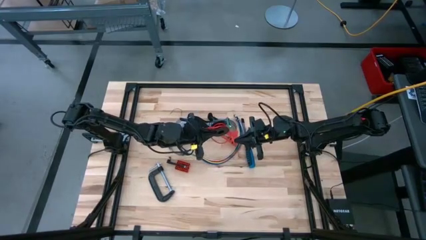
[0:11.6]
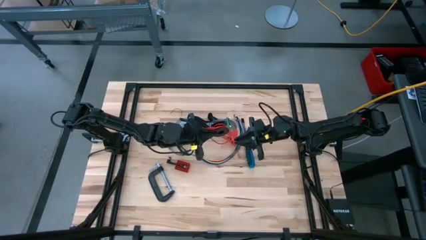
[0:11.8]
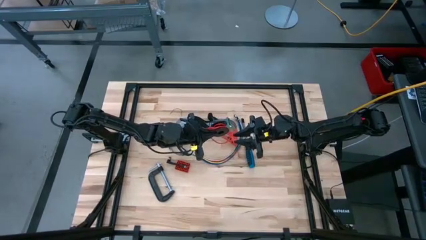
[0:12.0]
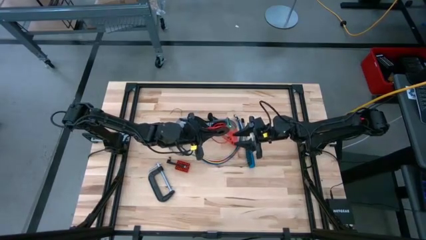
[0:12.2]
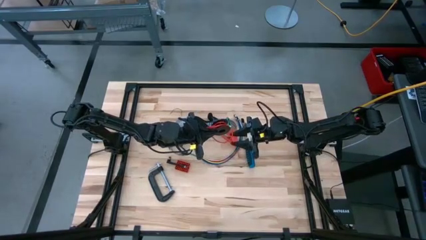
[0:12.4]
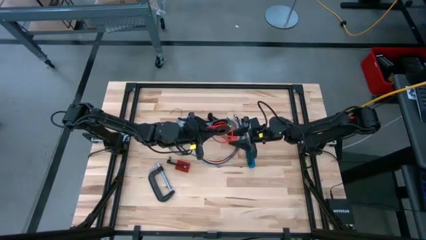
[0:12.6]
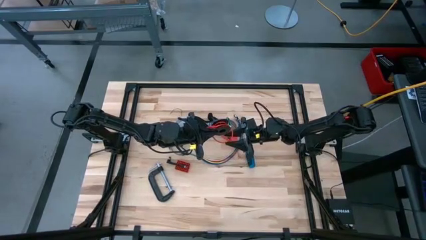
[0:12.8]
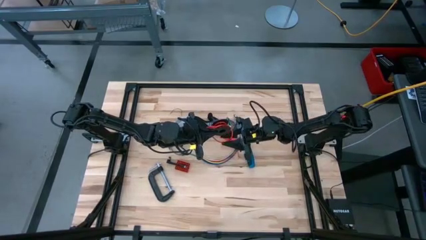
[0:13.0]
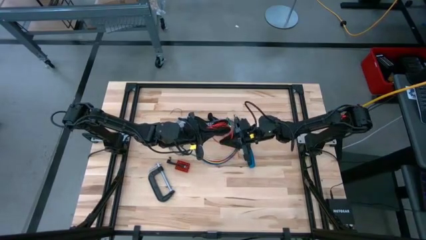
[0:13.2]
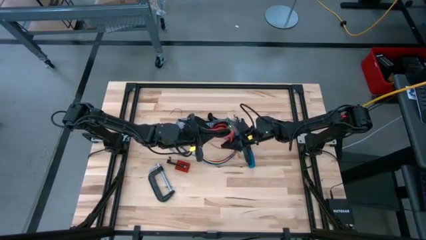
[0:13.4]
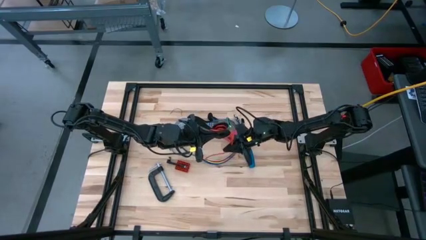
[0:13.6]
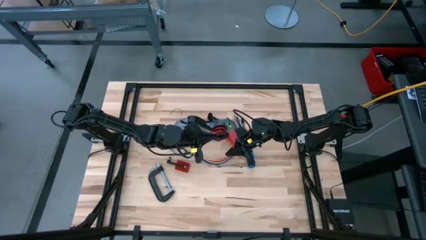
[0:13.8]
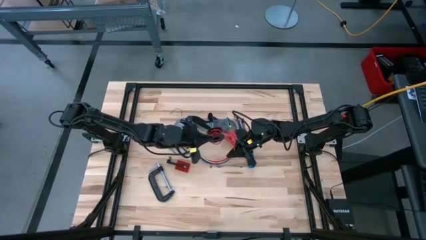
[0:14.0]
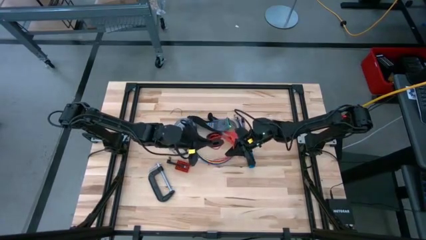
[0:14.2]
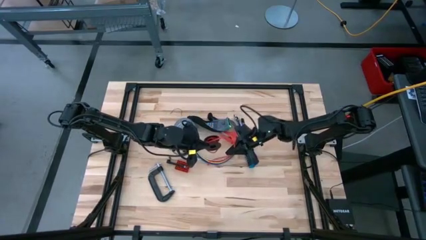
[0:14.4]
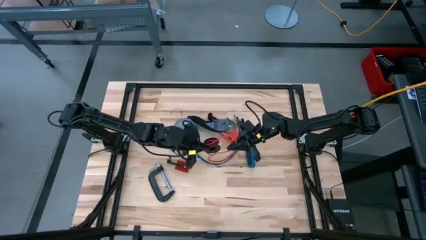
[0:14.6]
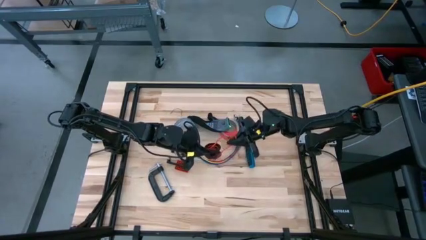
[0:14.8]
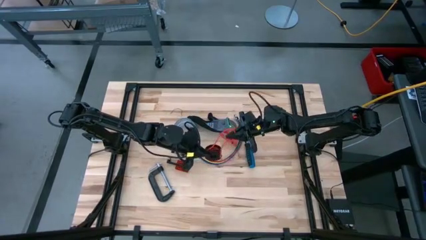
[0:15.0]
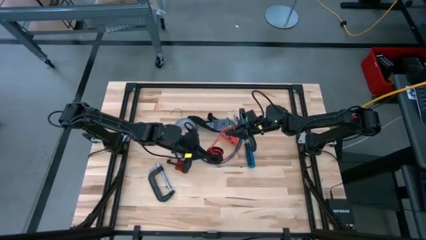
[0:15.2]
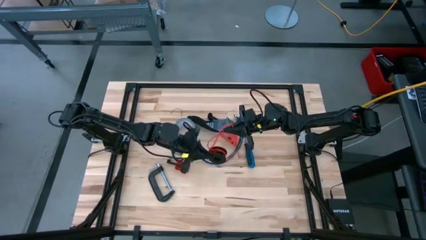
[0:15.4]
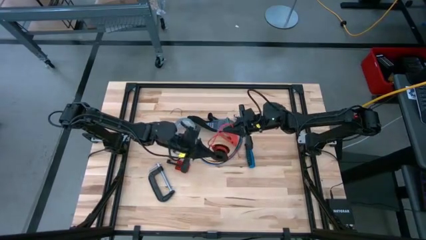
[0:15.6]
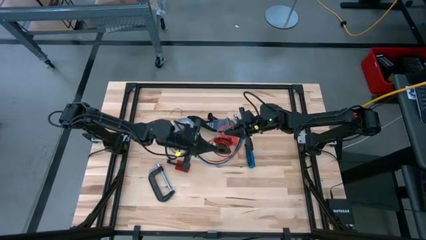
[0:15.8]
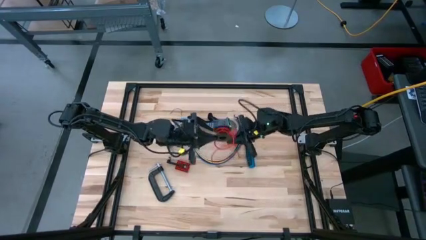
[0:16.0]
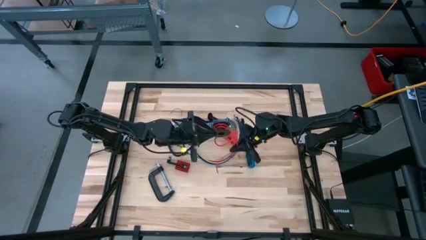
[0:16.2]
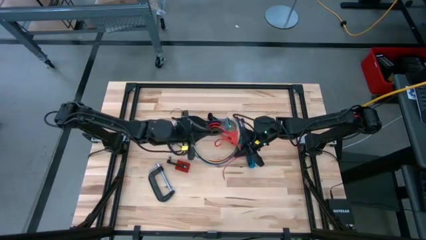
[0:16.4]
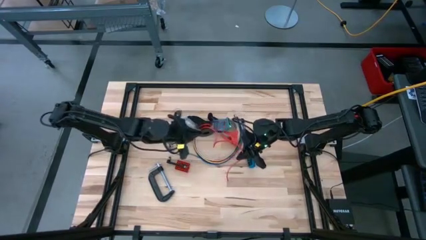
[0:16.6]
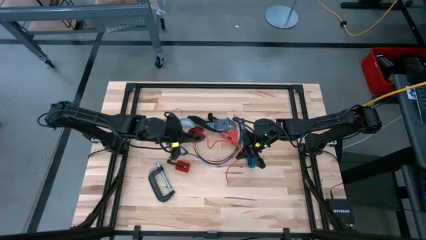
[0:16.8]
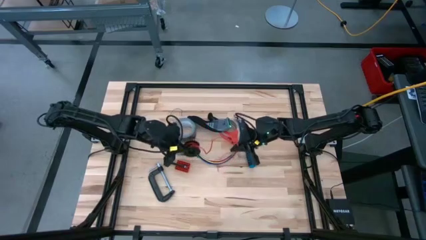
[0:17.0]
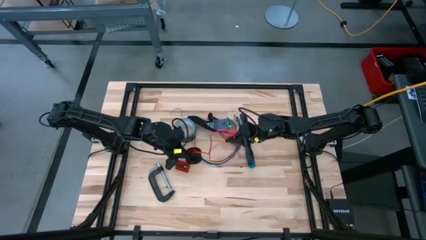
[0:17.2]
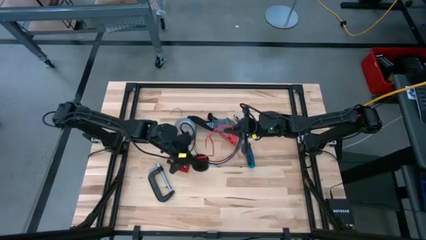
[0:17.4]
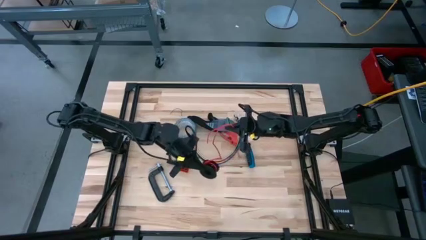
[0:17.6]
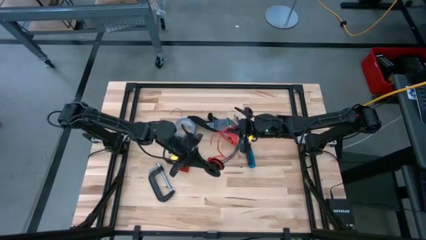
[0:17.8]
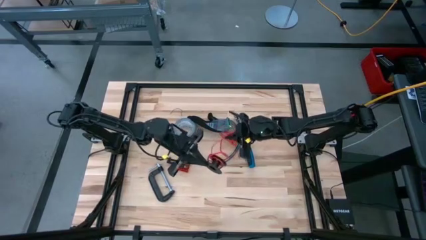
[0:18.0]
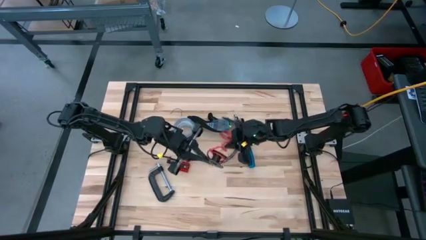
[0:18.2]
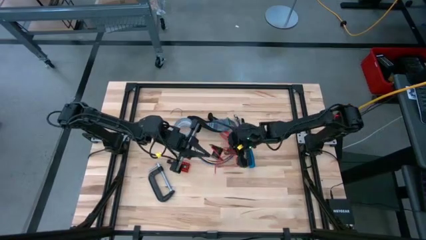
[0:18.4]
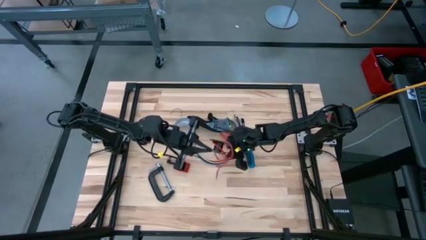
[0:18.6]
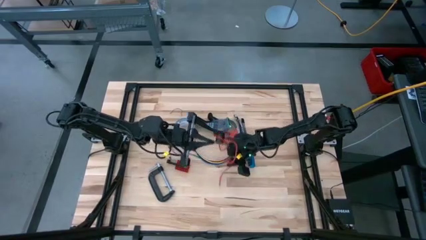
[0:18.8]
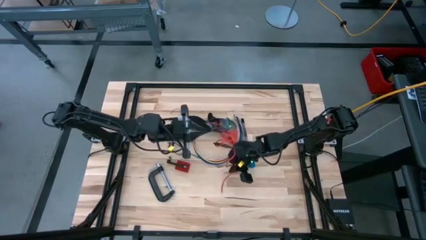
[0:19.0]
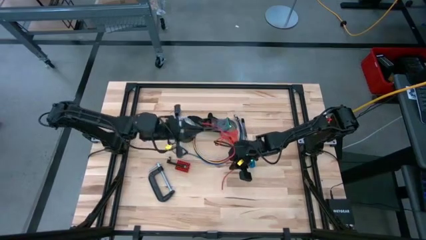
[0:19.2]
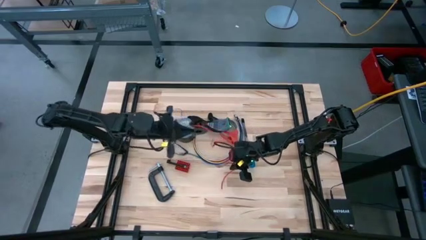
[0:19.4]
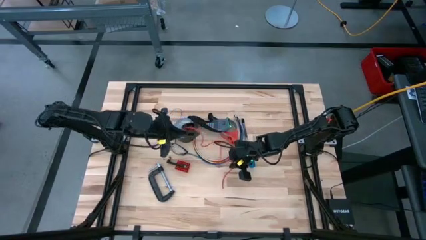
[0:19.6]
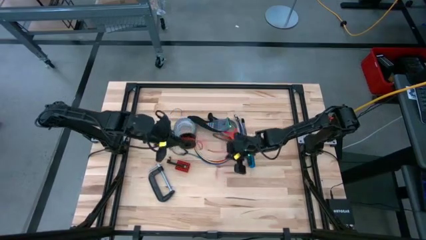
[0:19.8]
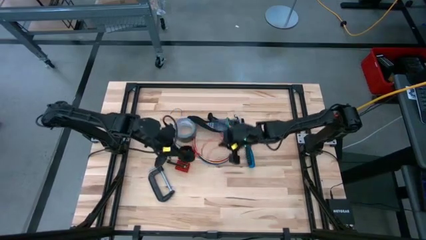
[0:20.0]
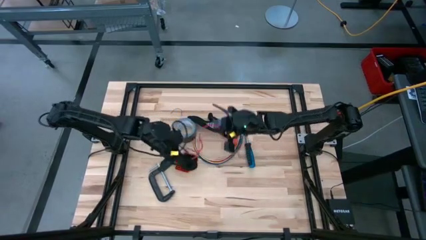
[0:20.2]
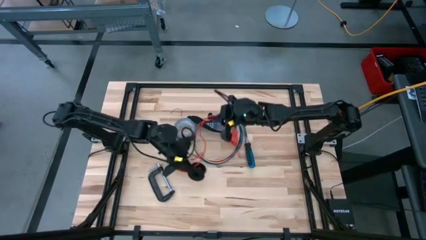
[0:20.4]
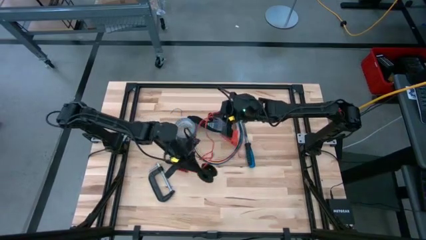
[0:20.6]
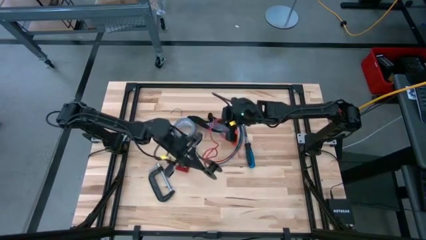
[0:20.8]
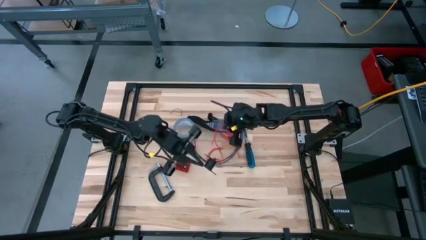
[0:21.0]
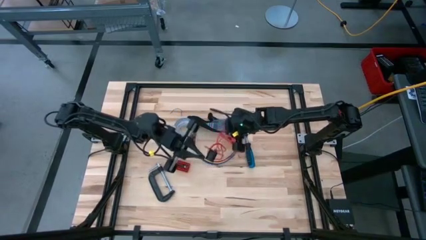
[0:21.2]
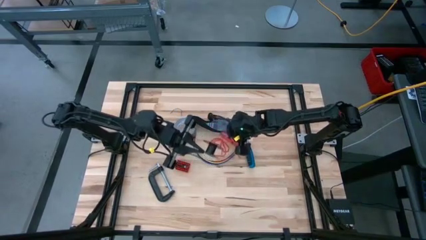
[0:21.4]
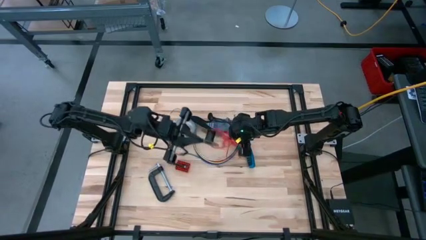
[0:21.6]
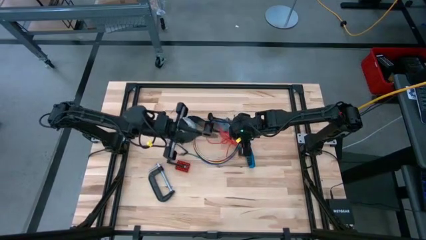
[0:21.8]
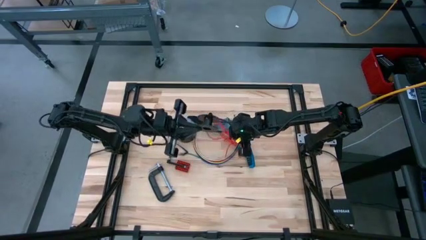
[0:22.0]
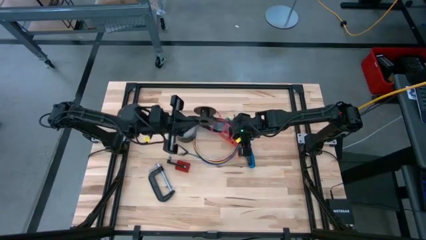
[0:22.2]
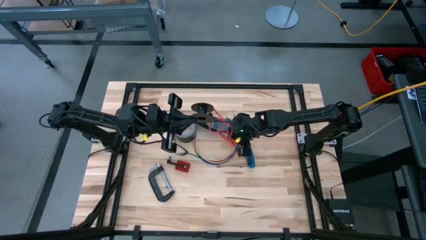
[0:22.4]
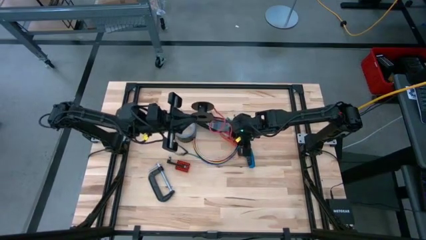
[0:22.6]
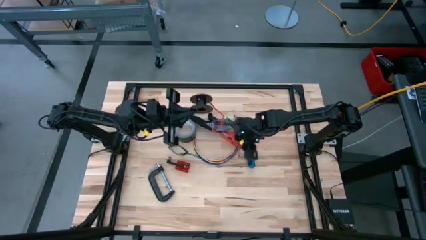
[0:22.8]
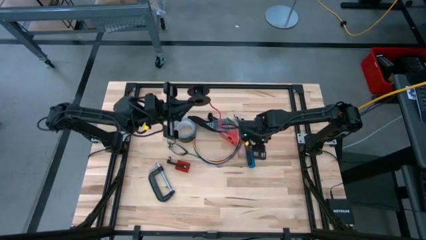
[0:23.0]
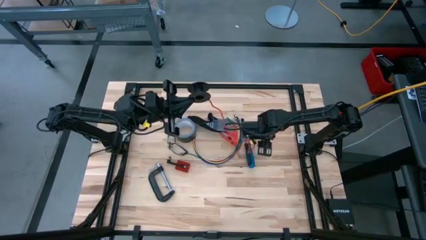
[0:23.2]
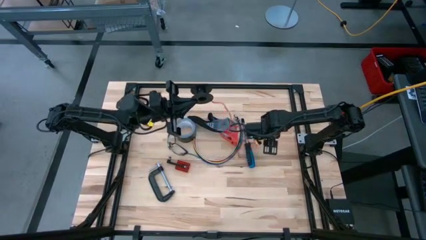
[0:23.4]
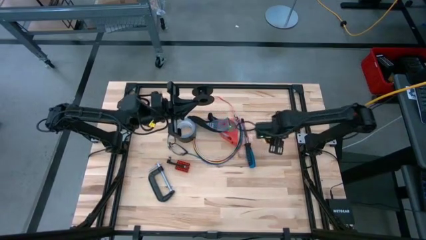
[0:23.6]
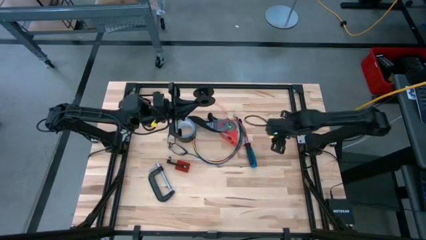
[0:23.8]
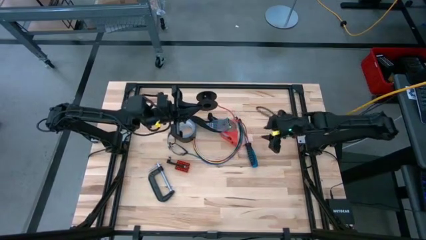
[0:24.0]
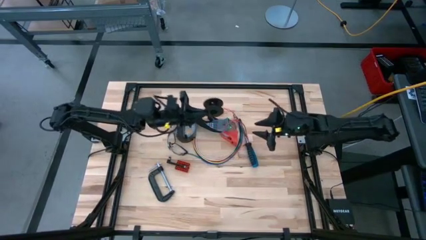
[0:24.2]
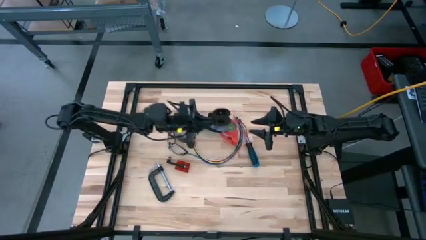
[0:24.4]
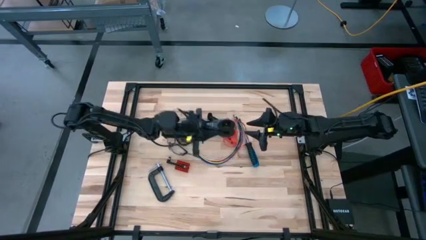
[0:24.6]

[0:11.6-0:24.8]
Task: Coil cords
Uncoil the red wire cable from the black spool
